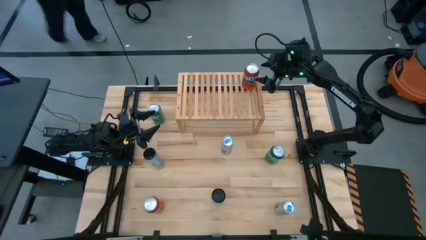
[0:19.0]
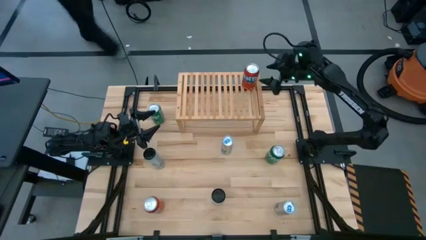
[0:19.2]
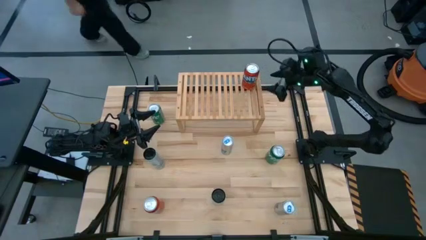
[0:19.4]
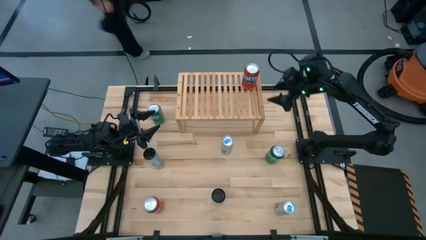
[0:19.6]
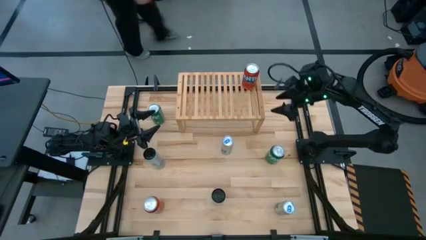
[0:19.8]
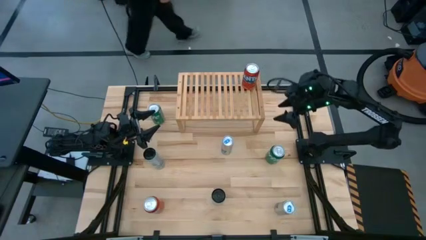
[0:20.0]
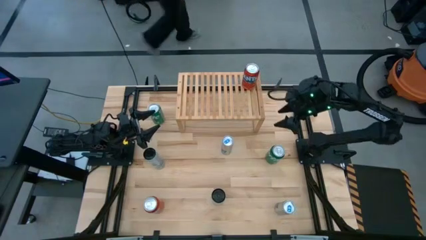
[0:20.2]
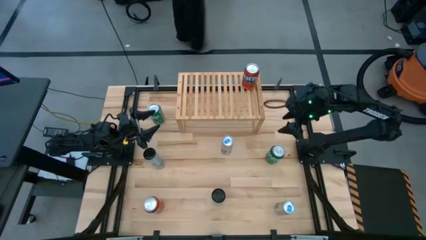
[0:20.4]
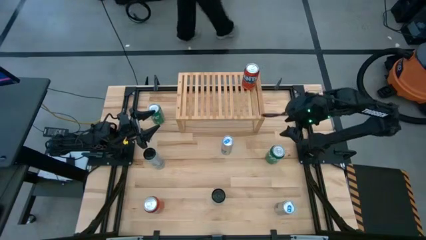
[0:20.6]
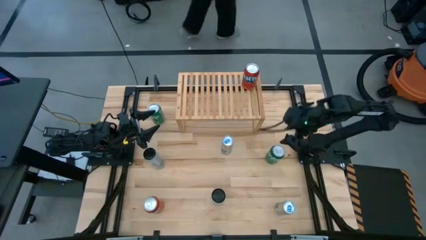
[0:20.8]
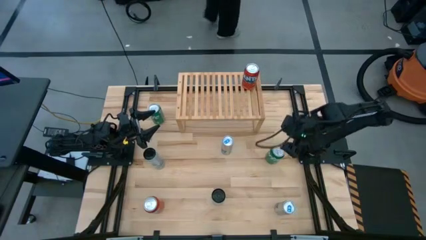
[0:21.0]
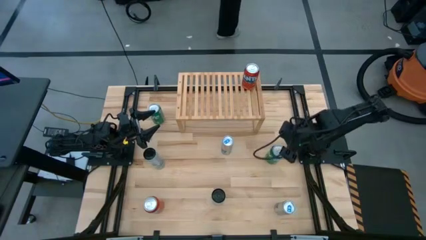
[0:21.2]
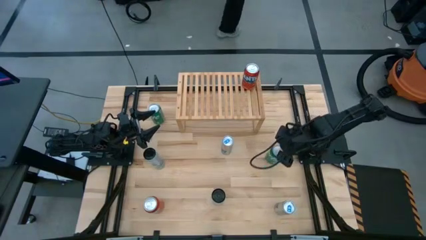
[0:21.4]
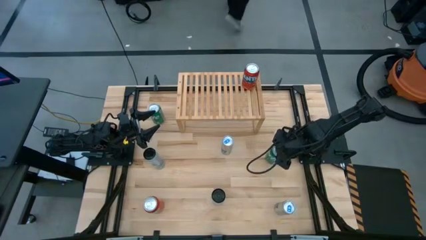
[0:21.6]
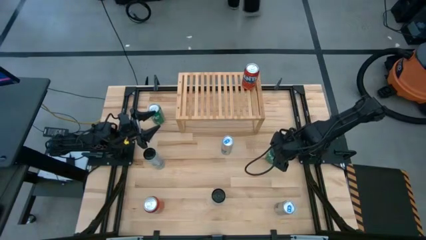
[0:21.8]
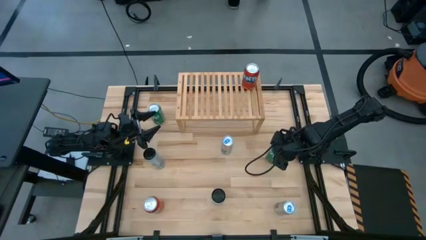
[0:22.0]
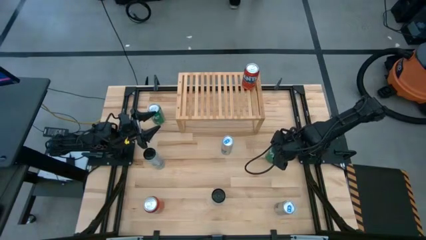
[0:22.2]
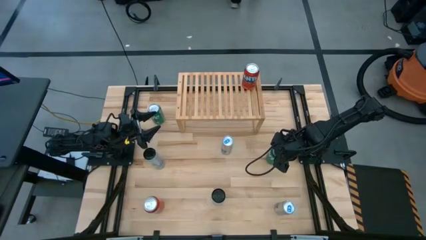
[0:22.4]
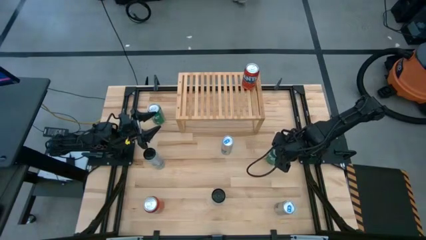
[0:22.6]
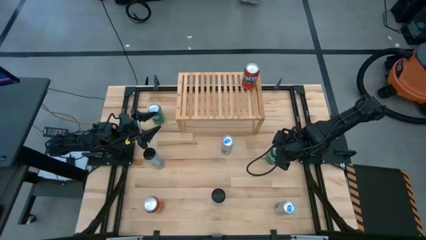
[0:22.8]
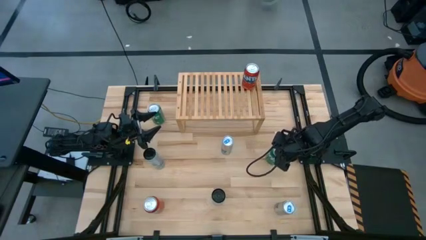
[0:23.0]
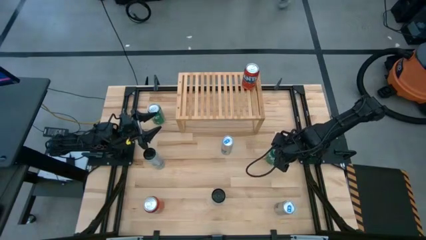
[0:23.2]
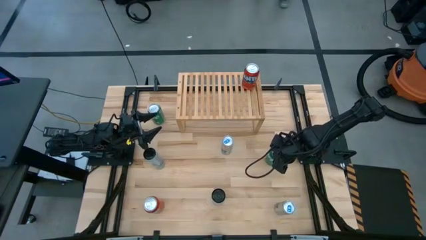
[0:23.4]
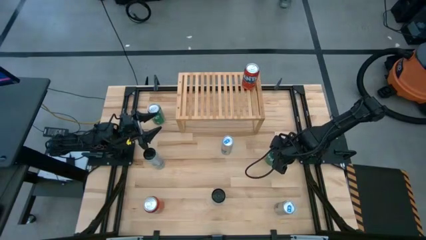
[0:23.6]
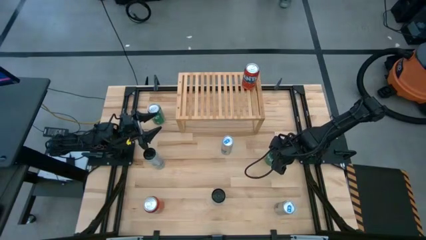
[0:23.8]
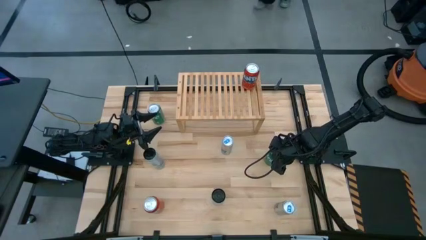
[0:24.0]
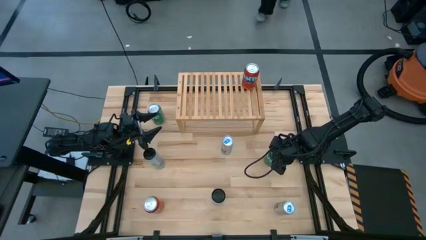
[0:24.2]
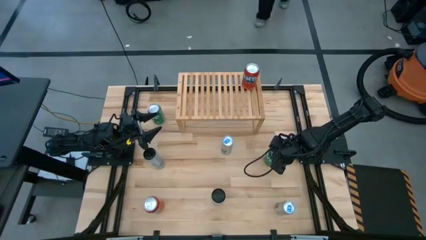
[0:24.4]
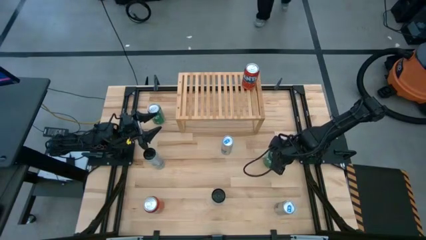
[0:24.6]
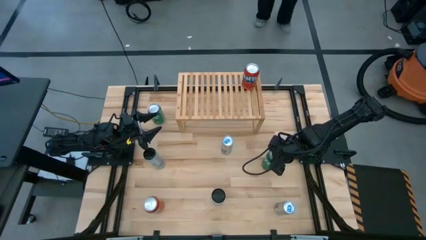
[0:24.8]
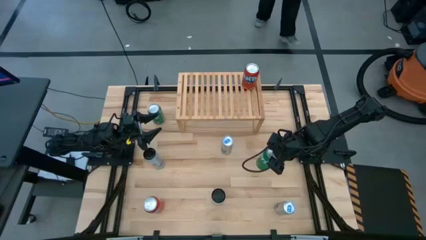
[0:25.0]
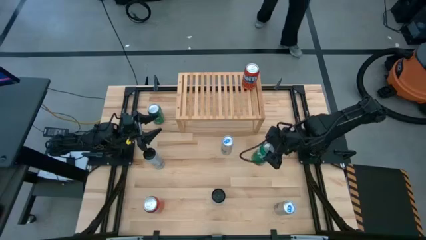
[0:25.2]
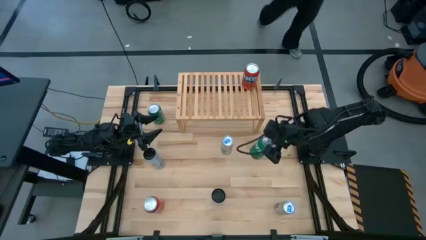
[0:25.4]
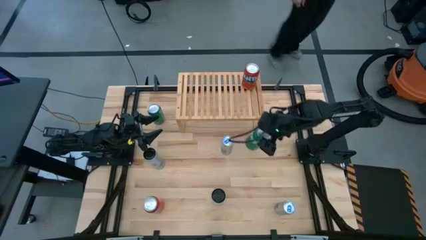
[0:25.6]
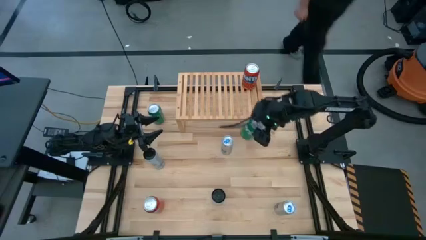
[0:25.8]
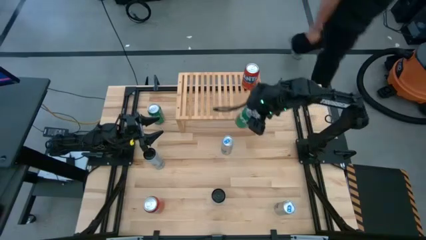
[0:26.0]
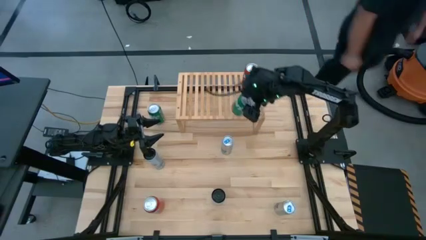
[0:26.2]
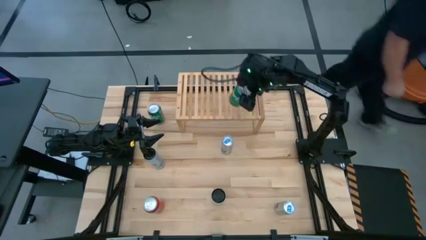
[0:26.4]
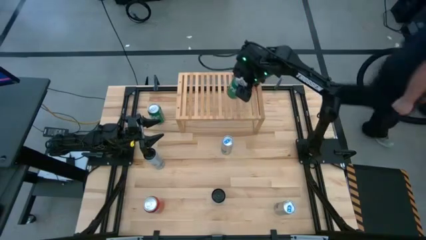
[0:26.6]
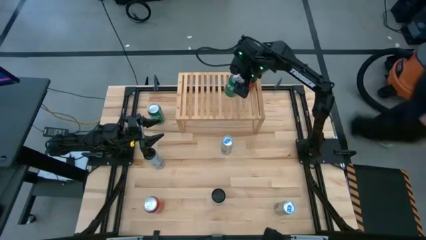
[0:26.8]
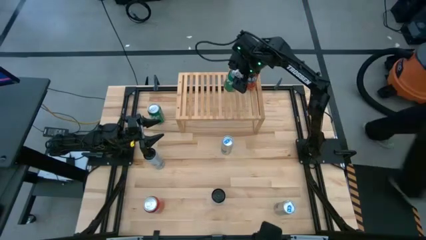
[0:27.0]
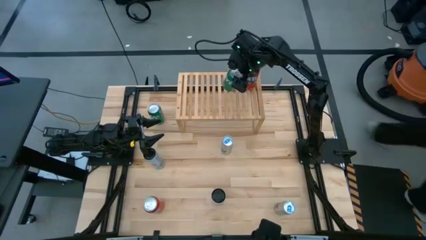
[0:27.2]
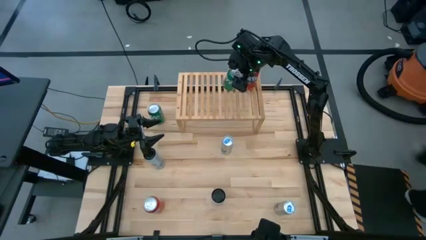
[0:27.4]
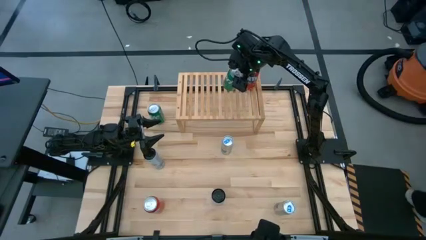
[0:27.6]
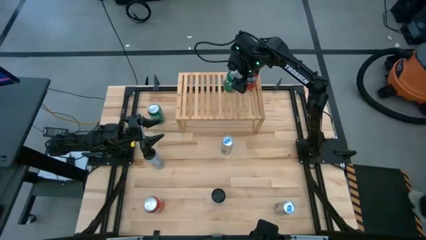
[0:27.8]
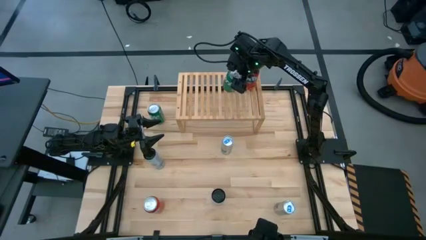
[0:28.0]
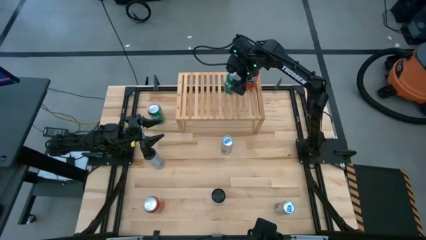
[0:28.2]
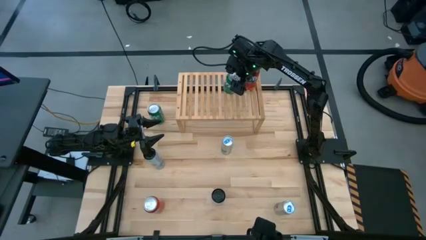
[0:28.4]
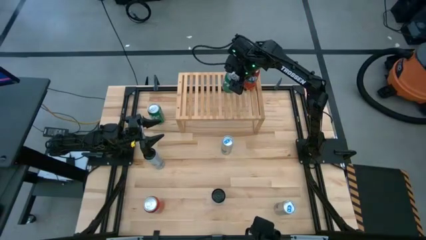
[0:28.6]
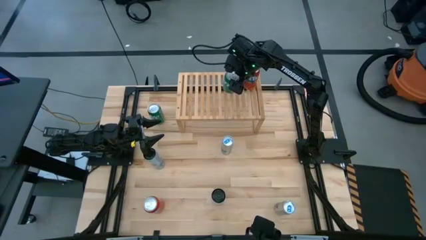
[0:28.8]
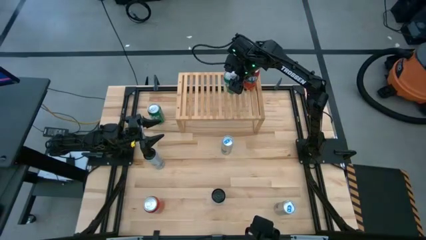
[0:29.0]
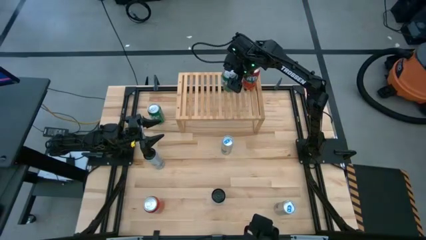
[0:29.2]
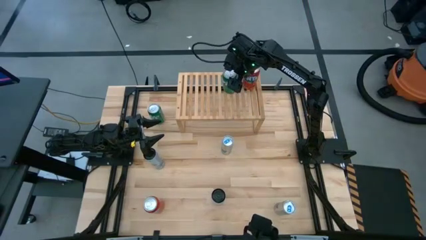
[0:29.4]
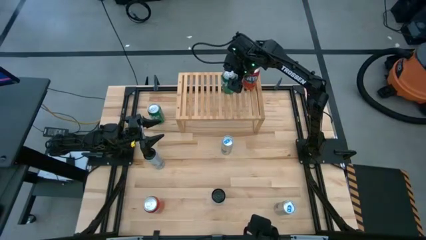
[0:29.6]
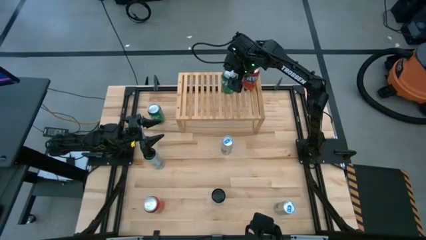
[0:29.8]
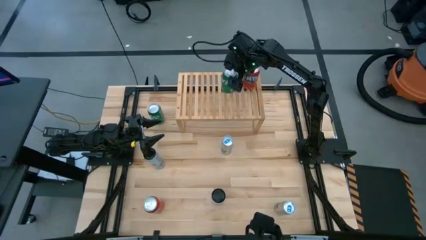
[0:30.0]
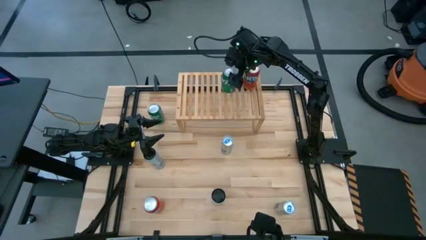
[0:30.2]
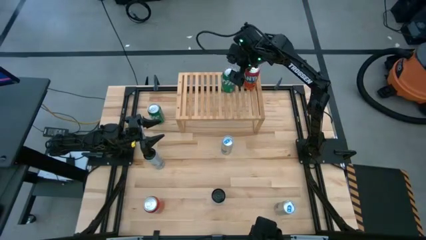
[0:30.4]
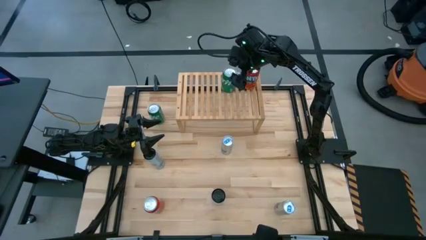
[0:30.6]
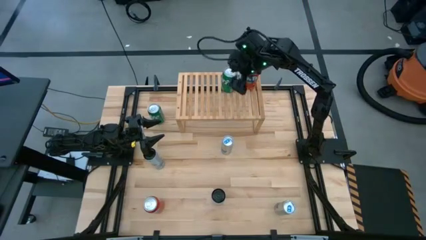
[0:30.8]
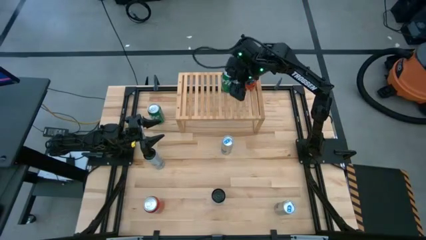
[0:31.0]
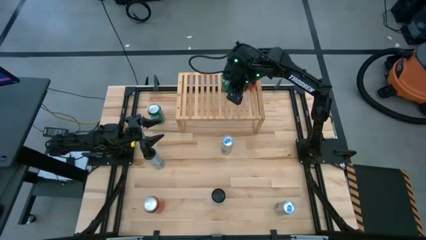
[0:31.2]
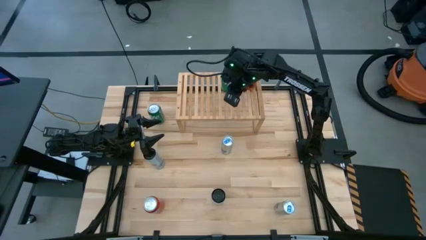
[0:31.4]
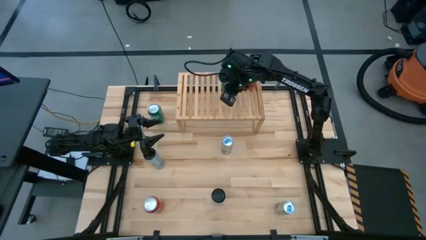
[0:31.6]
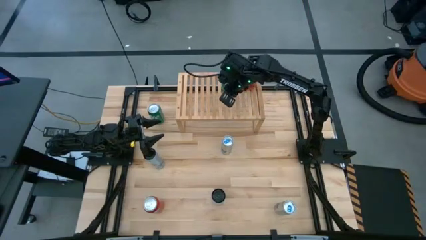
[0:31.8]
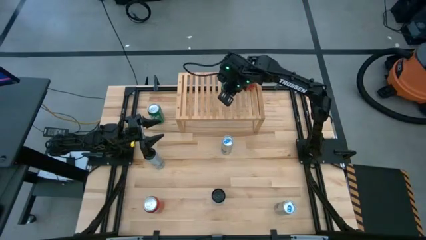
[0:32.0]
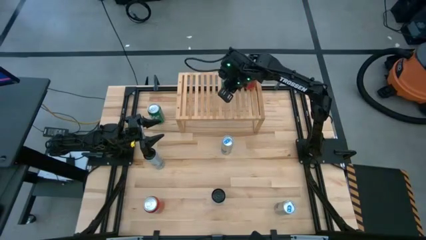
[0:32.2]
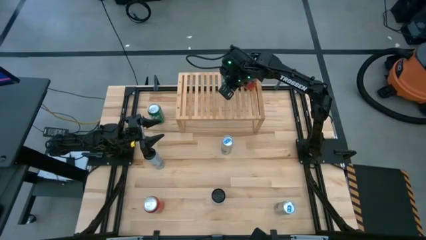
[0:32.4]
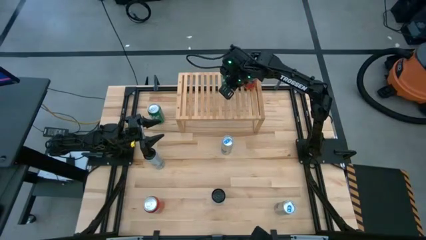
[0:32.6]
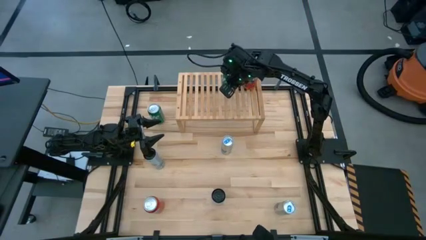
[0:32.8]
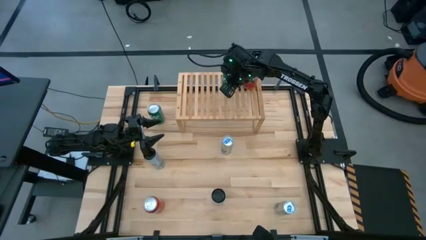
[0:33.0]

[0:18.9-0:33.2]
Task: Place canned beverage on shelf
Put the right green soda can on the shelf
